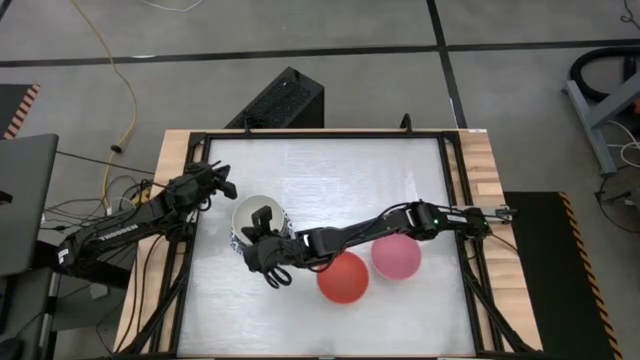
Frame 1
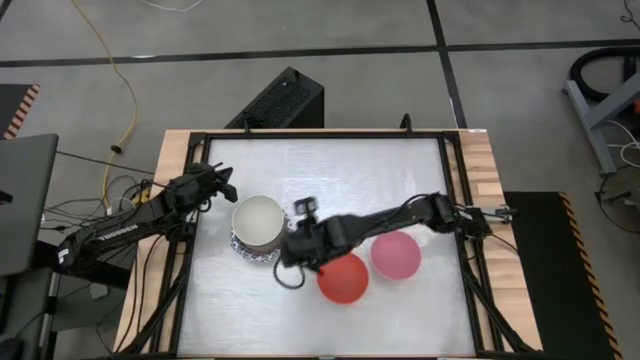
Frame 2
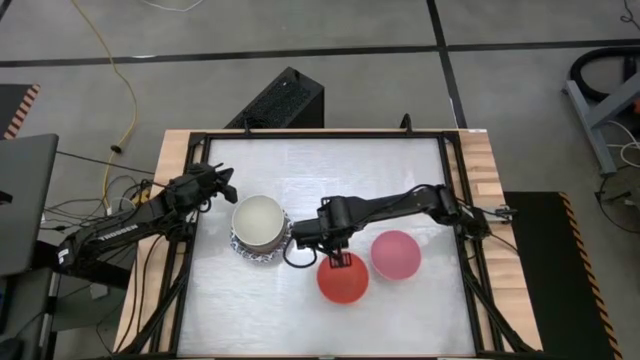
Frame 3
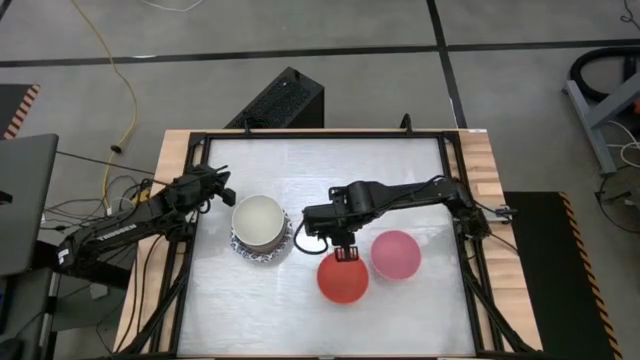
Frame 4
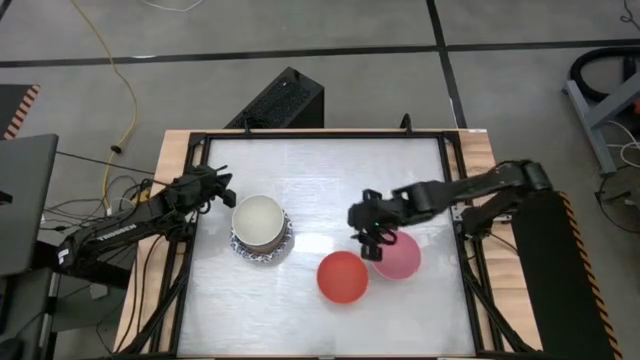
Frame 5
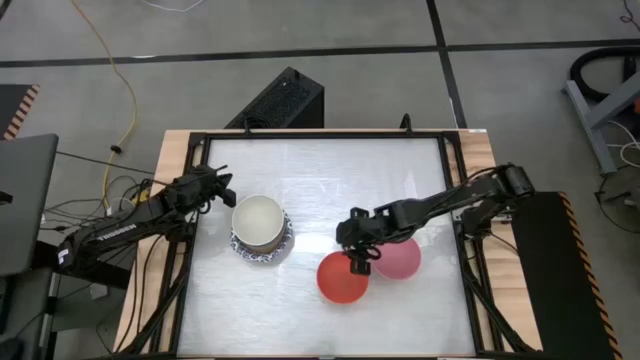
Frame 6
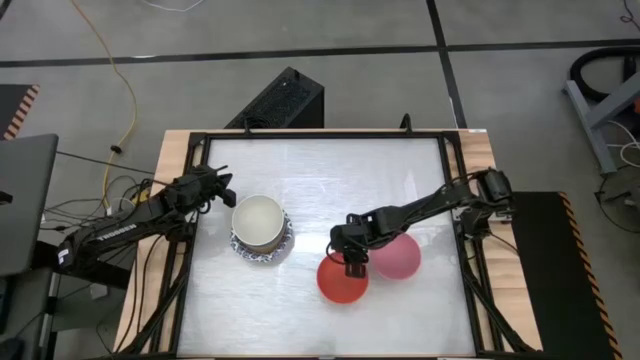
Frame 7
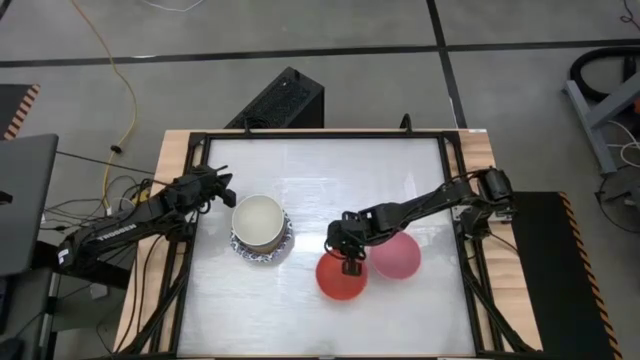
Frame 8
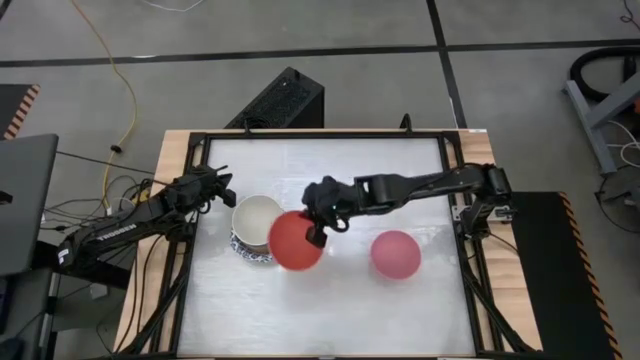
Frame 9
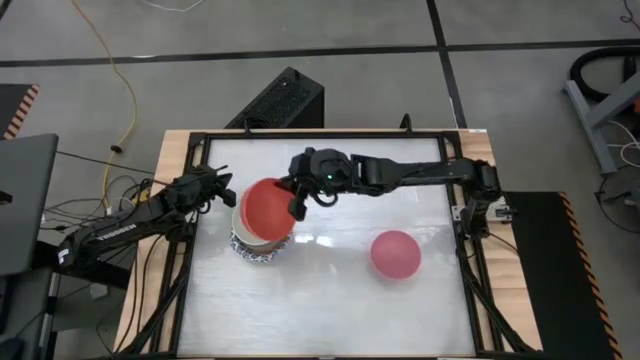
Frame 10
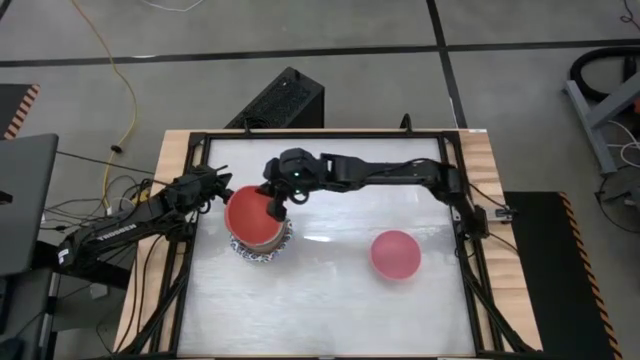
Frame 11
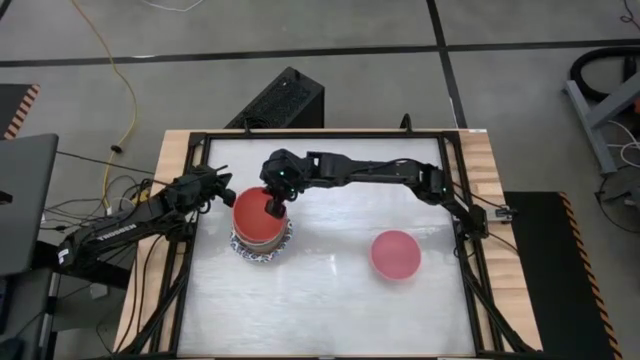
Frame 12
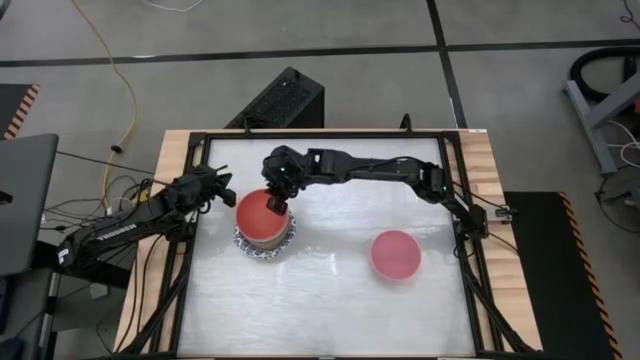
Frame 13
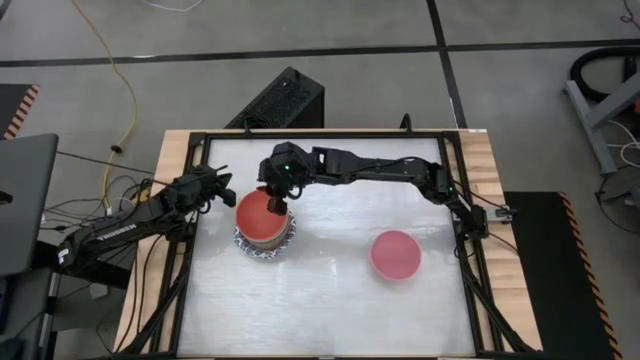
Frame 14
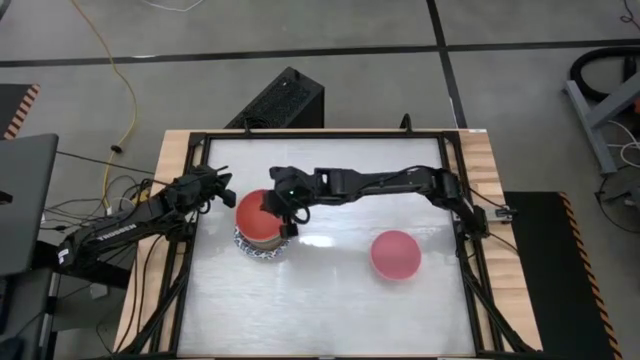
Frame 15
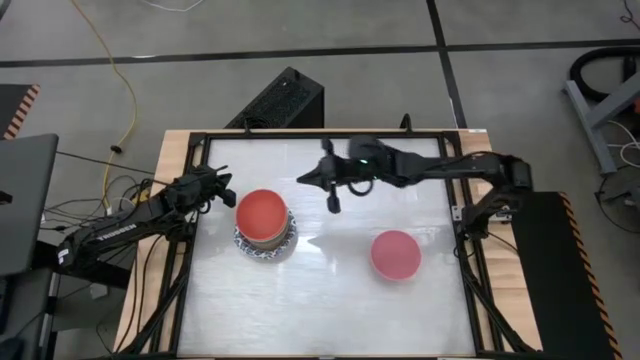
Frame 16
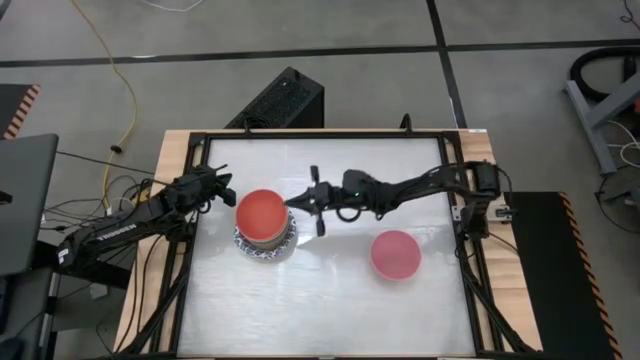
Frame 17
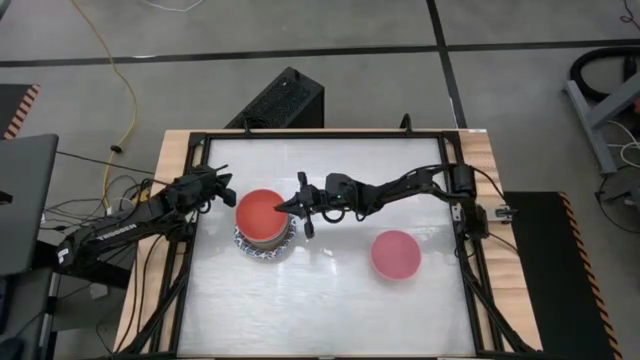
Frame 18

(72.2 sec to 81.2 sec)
Stack the orange bowl on top of the white bowl

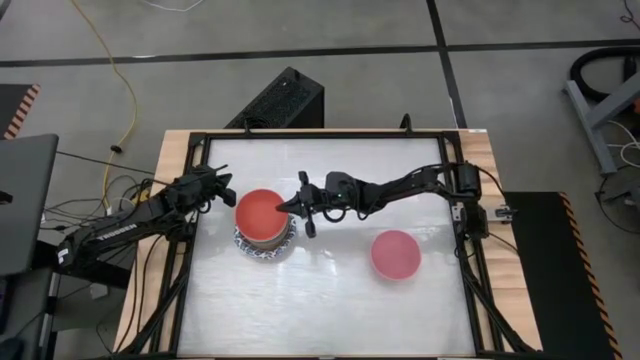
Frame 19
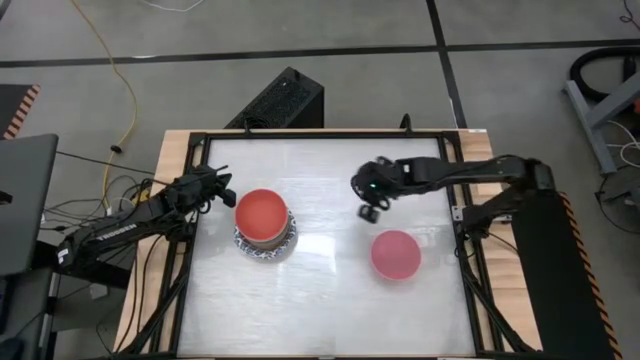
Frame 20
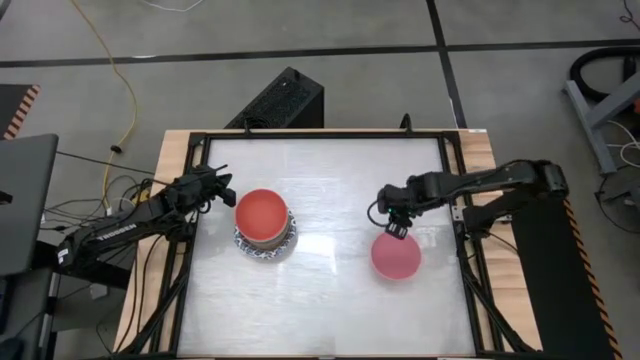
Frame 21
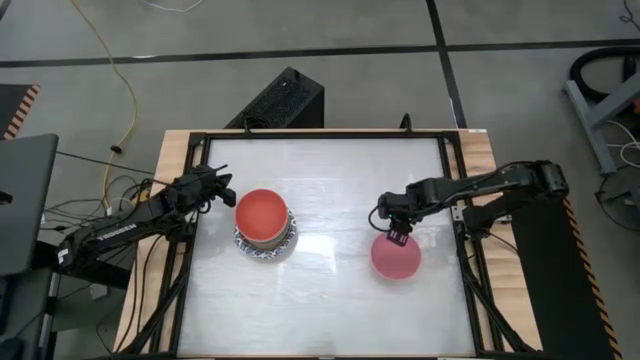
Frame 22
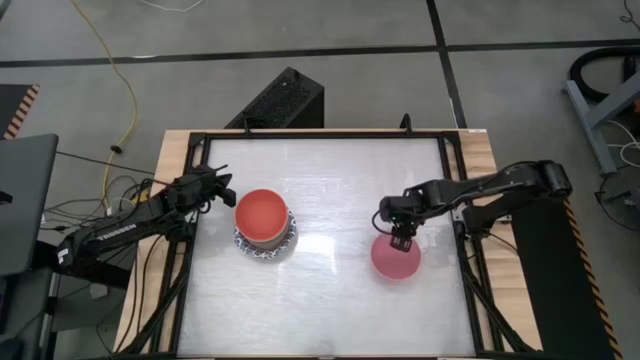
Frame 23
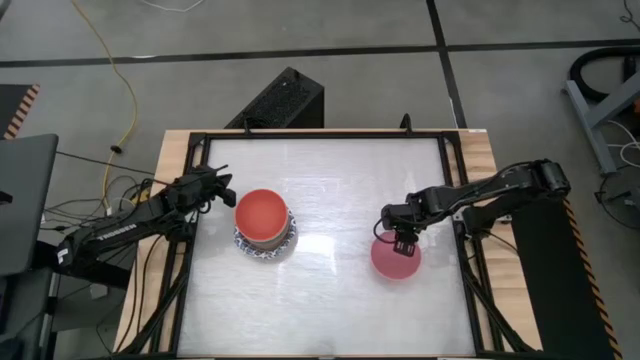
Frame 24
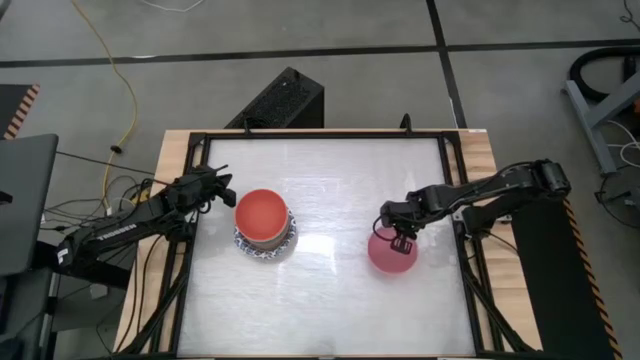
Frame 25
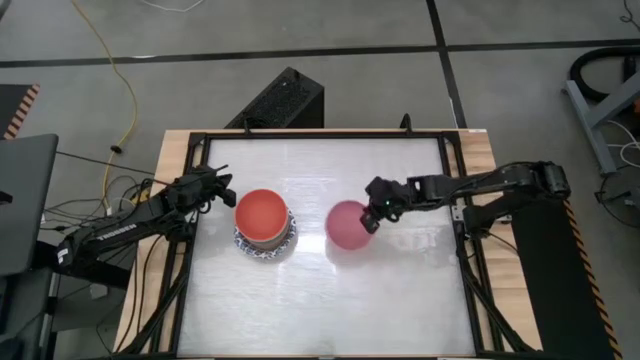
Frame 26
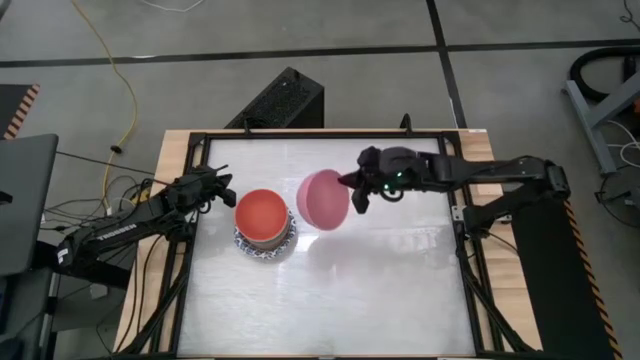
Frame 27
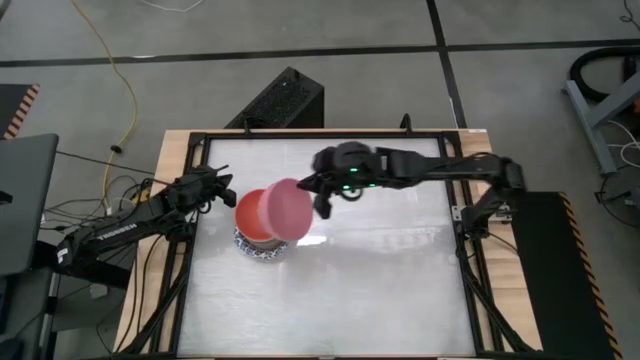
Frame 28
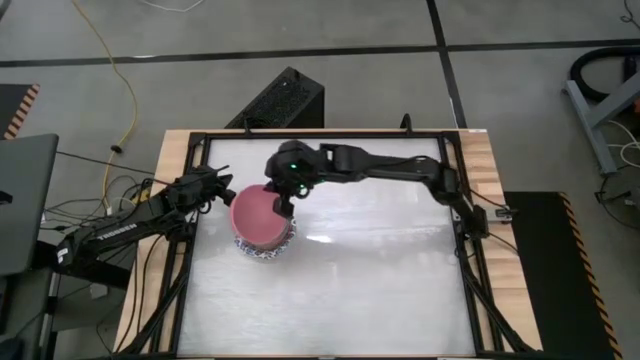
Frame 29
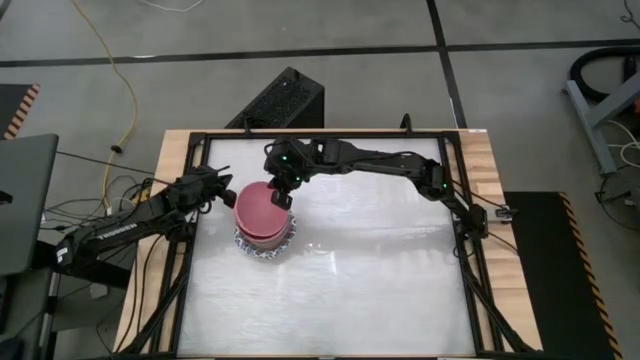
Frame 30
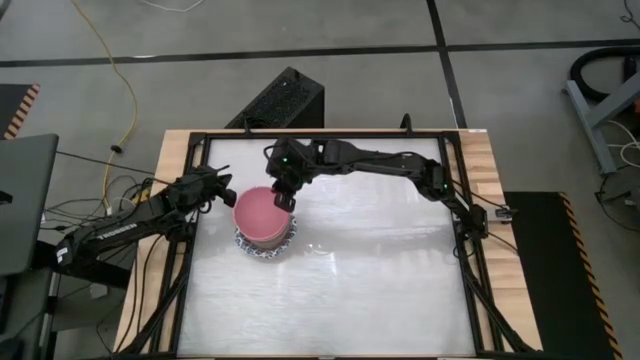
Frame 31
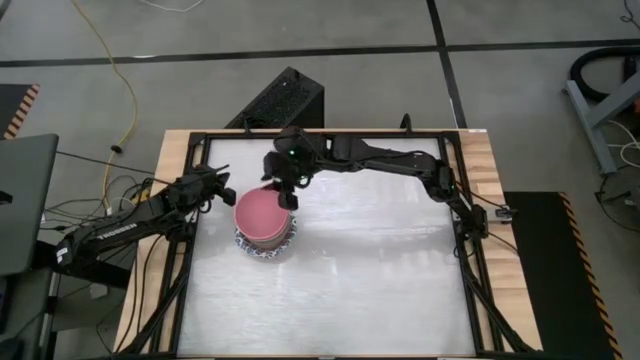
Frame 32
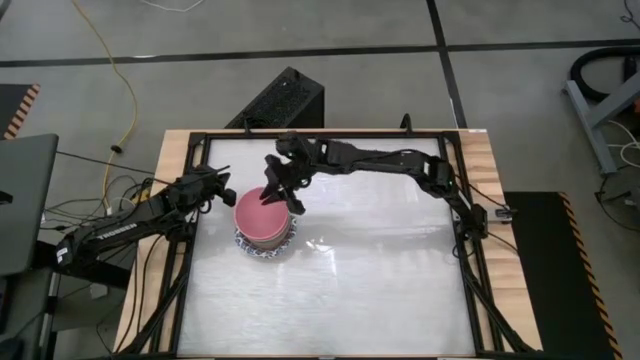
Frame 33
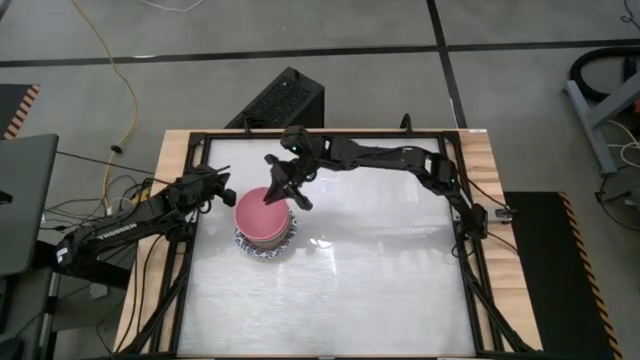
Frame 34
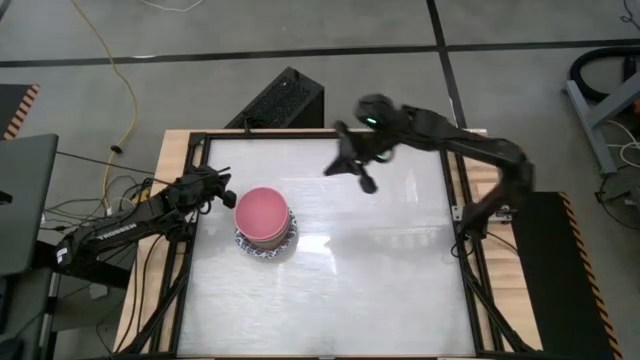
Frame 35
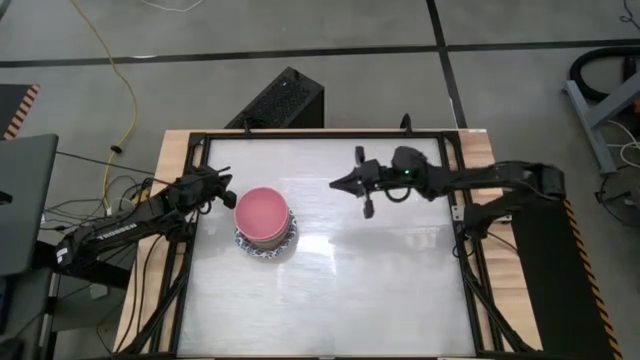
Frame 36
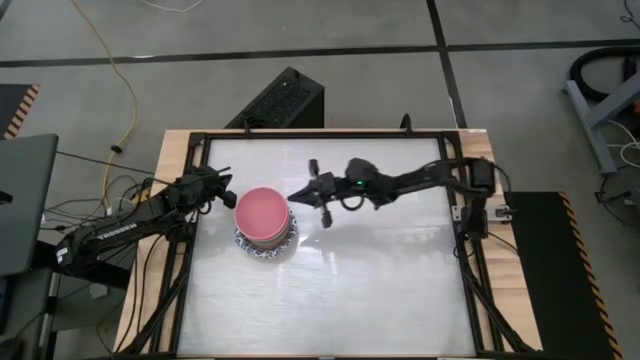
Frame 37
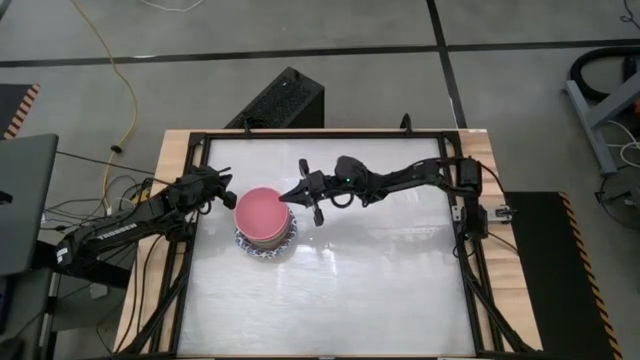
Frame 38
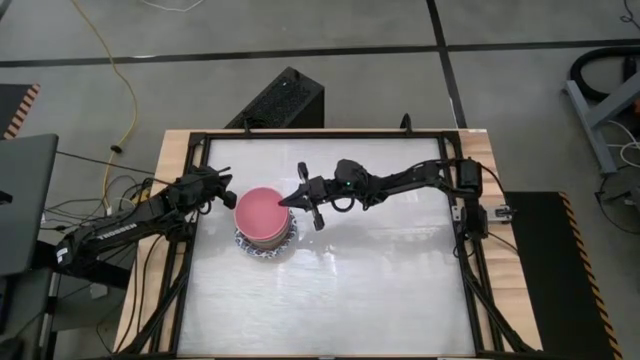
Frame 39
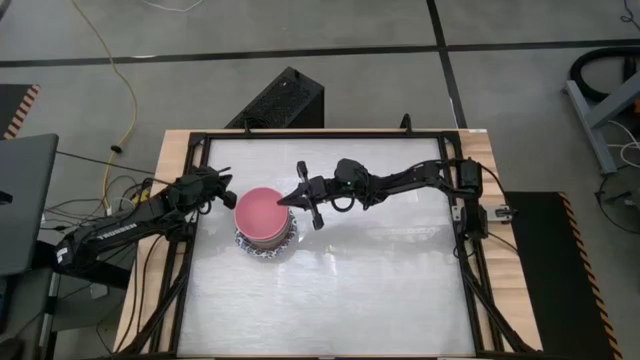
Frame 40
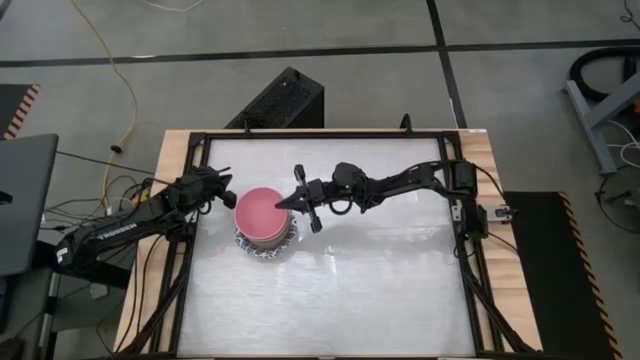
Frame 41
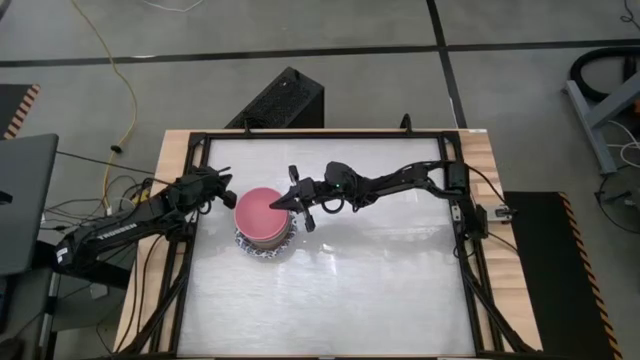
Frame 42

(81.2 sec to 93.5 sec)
Stack the pink bowl on top of the orange bowl
